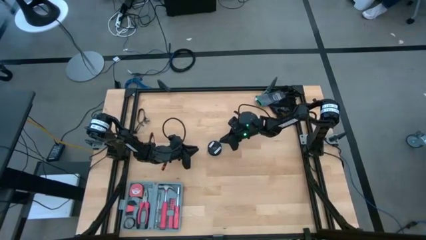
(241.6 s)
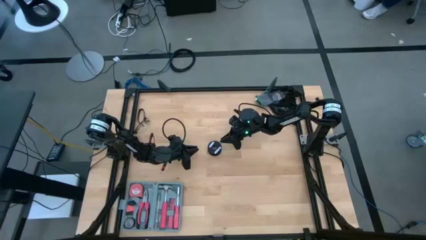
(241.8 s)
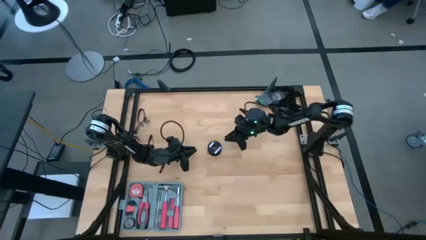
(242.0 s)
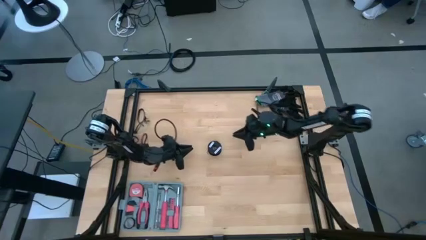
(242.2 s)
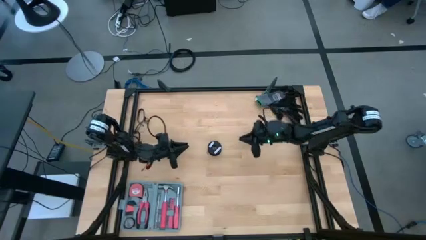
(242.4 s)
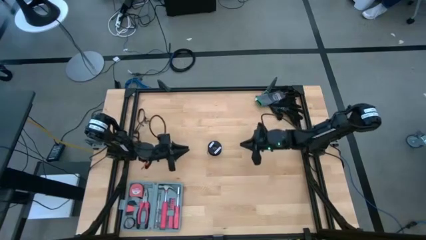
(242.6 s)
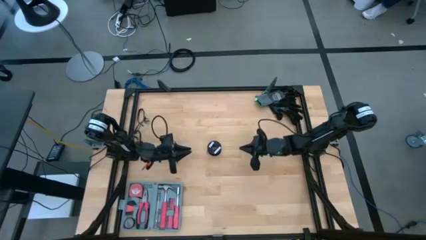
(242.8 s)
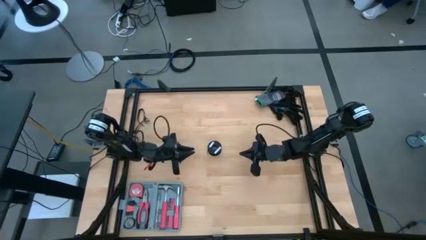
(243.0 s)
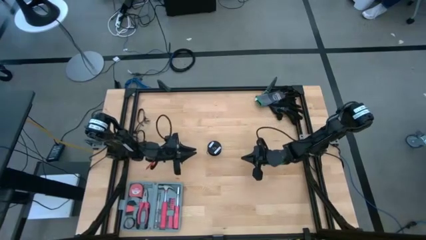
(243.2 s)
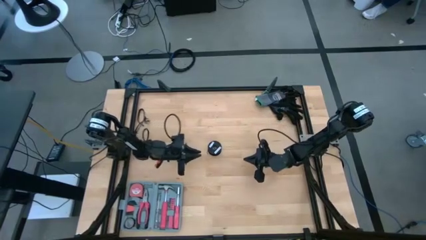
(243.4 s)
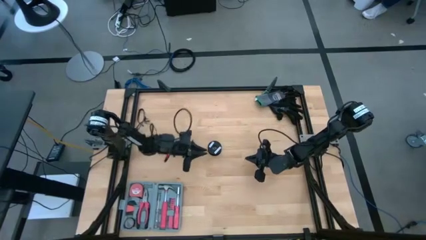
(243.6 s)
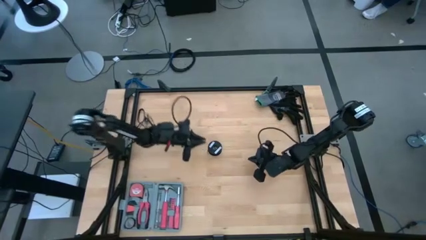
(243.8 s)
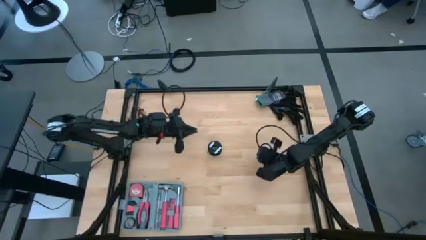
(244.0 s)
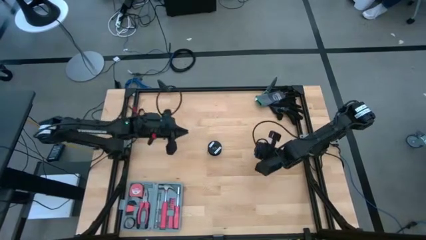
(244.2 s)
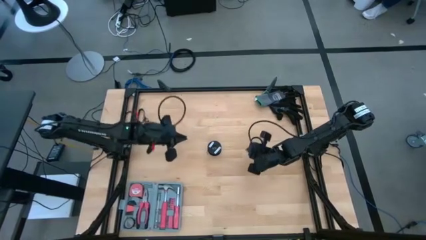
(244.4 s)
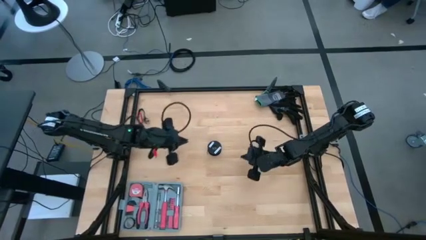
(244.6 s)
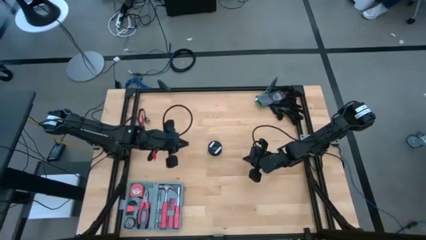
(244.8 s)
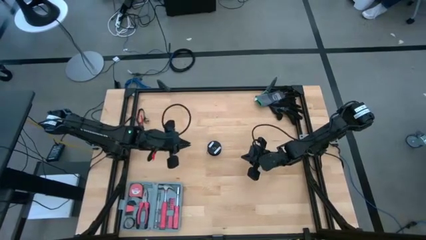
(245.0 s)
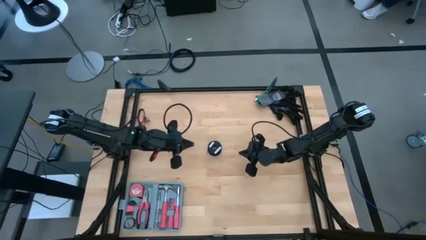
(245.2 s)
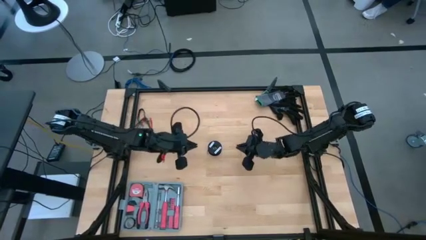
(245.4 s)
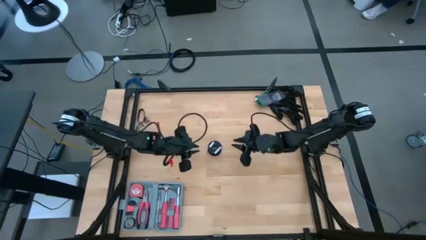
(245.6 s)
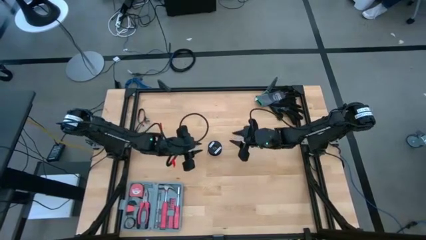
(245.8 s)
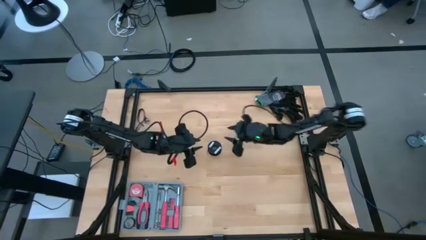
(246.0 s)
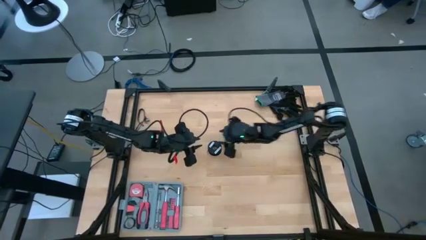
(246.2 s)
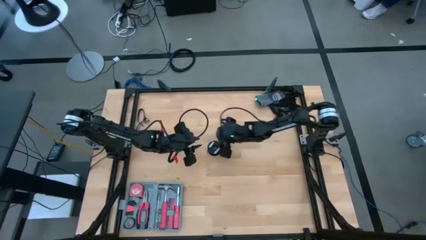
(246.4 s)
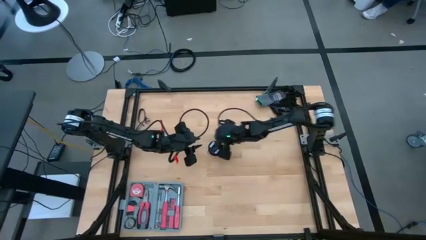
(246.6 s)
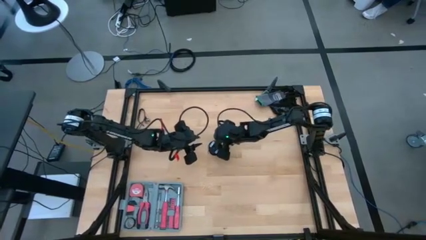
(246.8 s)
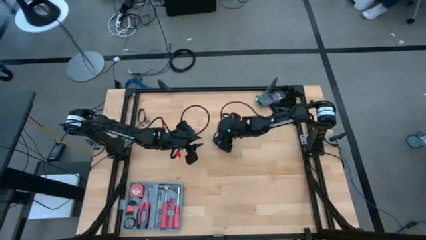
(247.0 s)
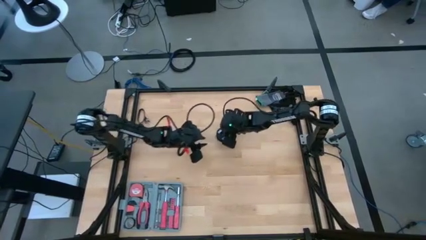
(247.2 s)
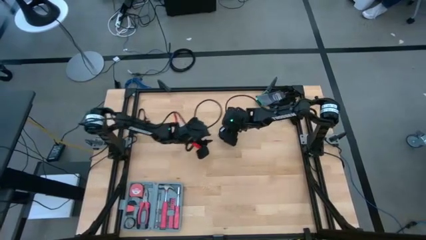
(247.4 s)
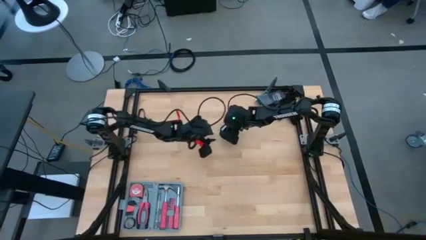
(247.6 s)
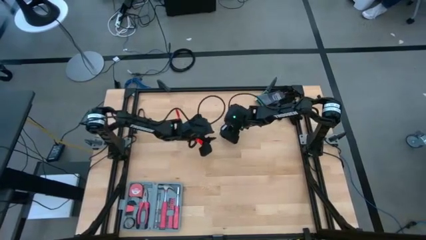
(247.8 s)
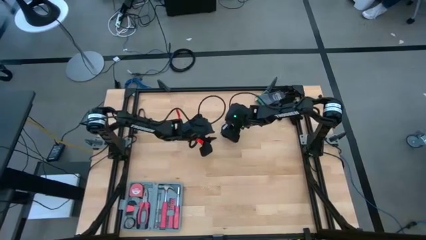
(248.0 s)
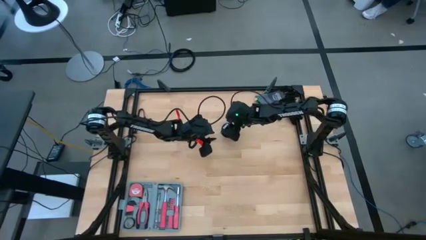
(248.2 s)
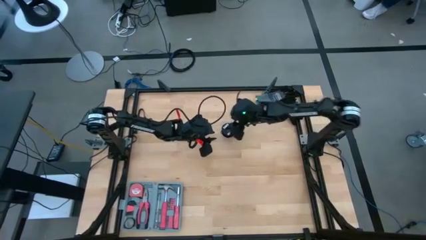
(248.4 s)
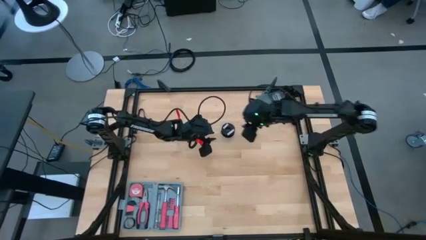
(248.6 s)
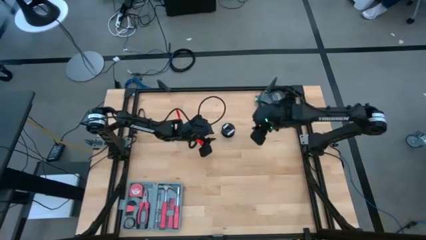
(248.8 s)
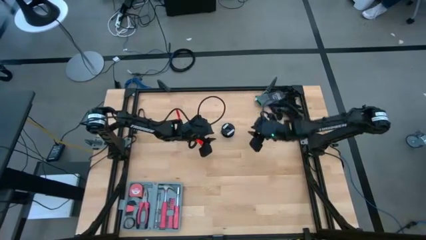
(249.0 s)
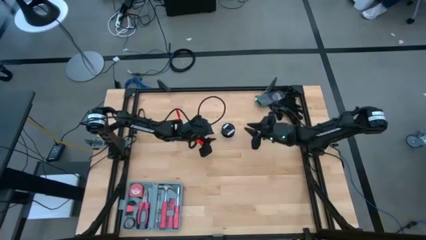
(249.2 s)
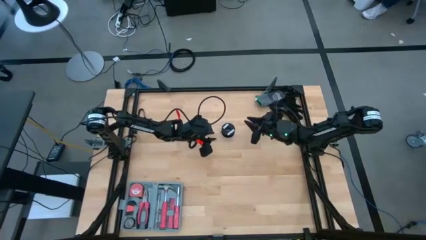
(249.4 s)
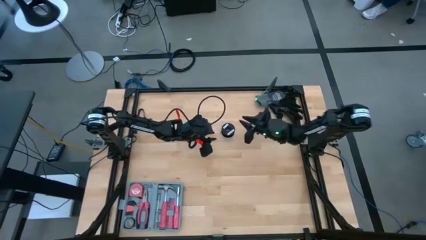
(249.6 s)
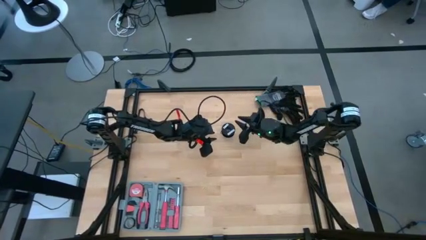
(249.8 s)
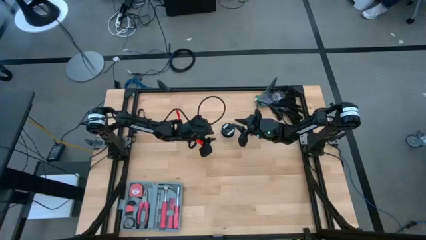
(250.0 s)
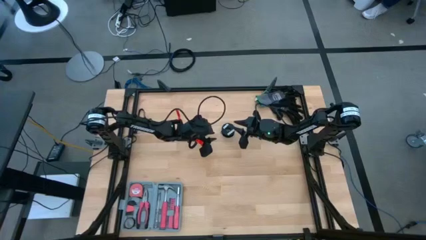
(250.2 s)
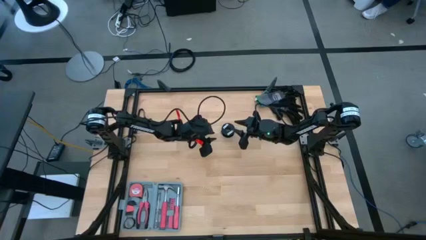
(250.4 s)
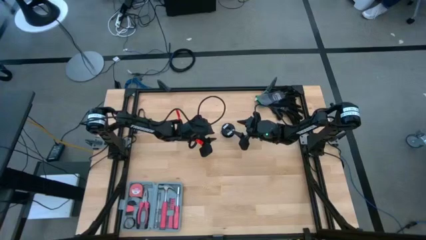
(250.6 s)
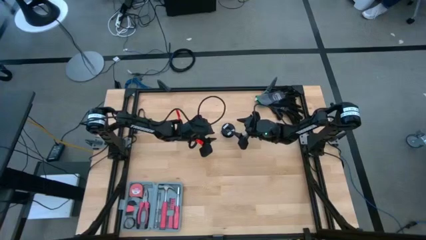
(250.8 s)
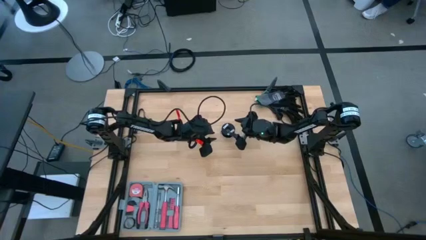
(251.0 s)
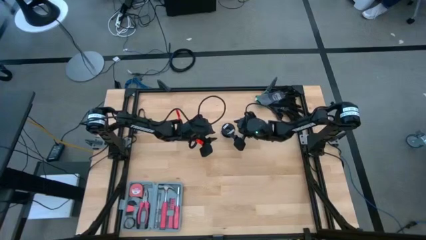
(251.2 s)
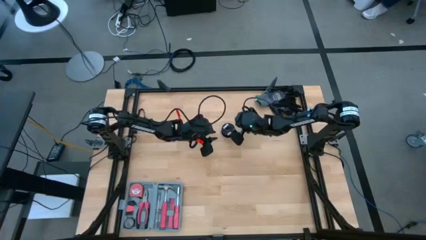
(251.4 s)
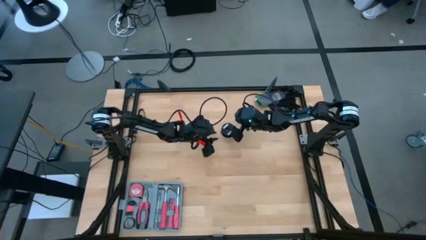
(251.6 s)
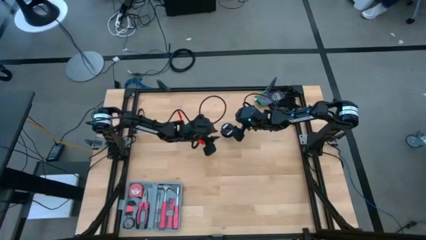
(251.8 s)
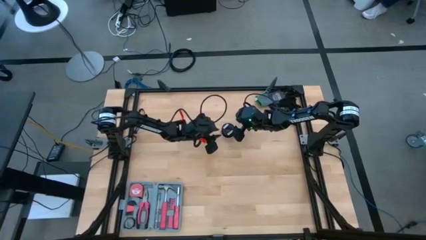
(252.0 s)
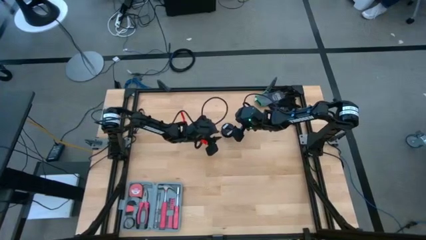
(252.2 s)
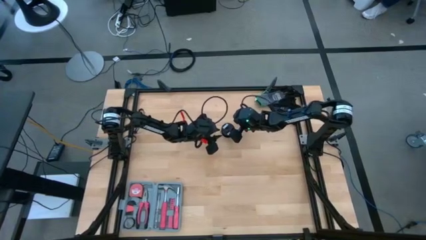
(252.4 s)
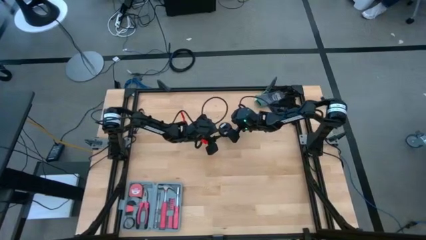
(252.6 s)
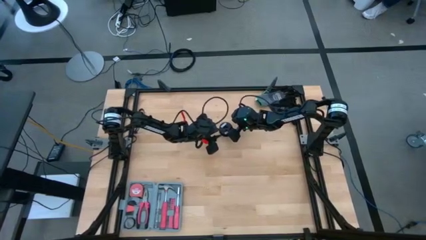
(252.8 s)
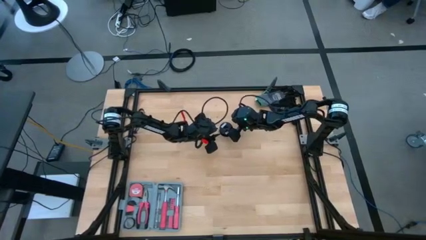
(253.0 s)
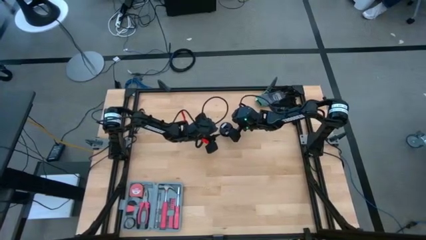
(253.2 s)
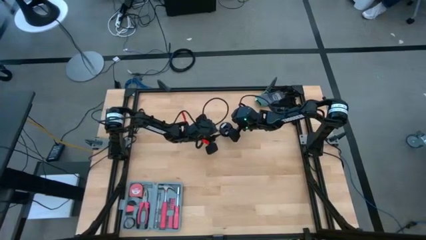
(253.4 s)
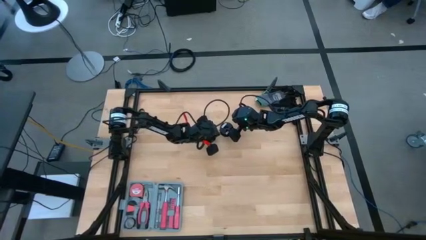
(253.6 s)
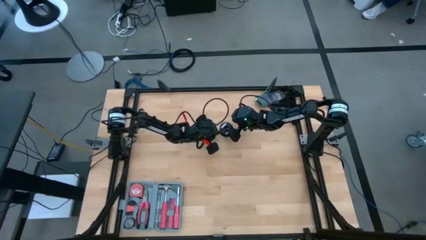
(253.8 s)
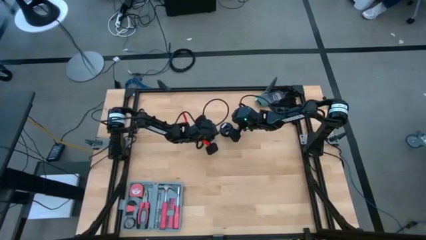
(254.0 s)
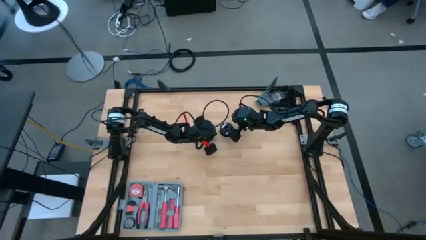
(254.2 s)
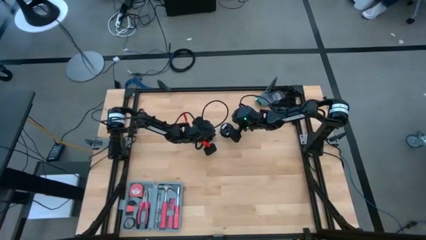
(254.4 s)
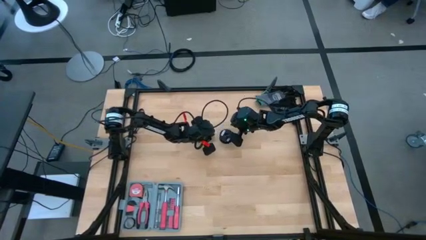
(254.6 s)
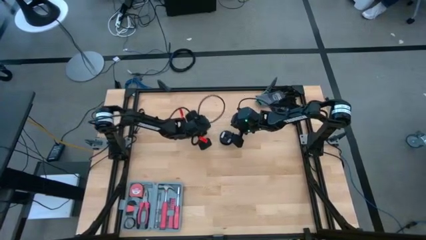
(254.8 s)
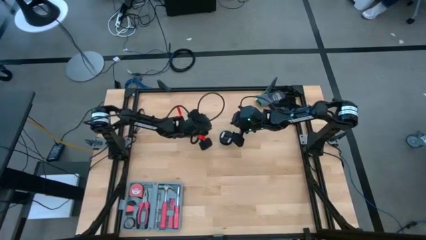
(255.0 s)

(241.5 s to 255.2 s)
Task: Coil cords
Uncoil the black wire from the spool
